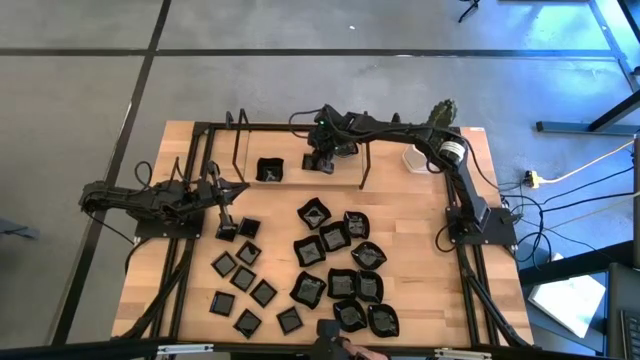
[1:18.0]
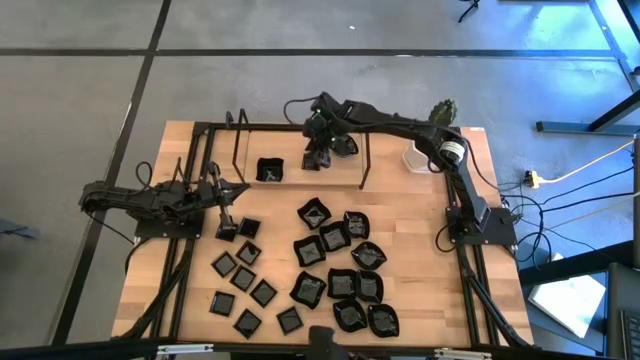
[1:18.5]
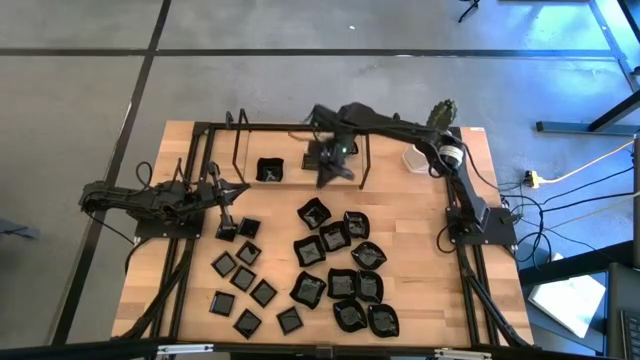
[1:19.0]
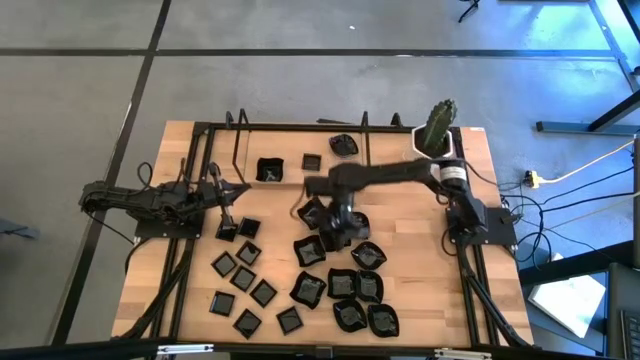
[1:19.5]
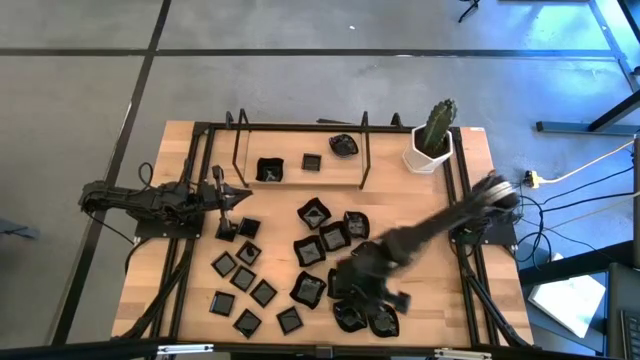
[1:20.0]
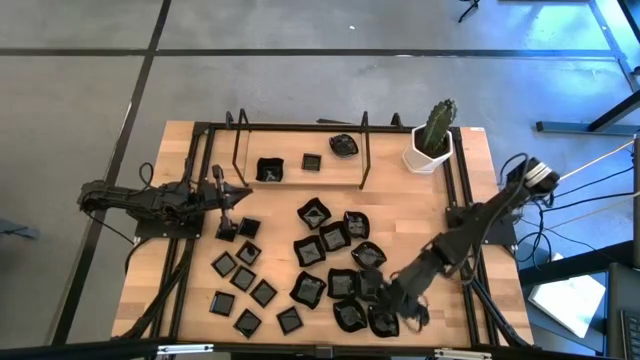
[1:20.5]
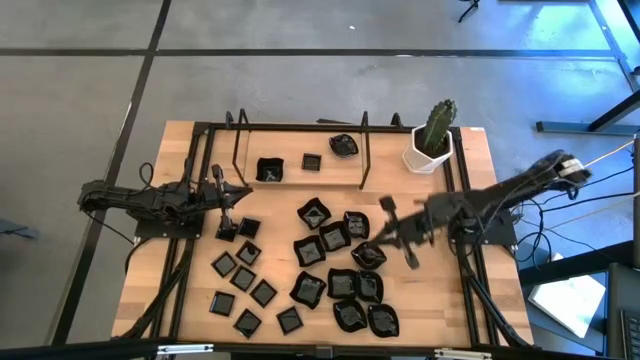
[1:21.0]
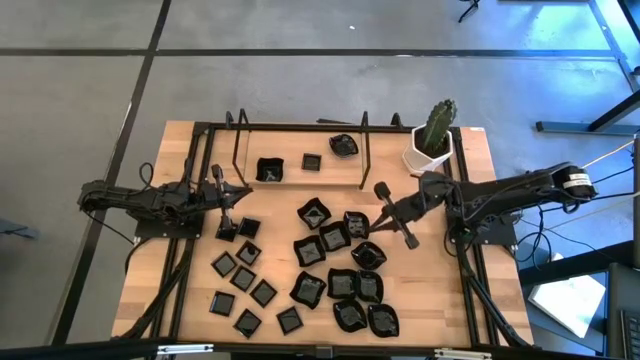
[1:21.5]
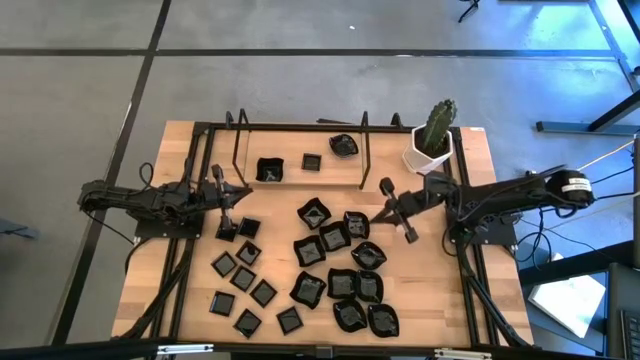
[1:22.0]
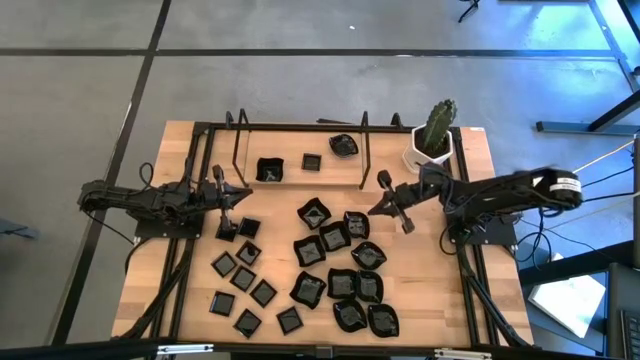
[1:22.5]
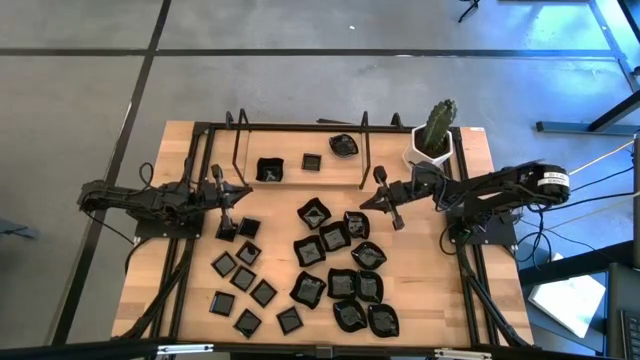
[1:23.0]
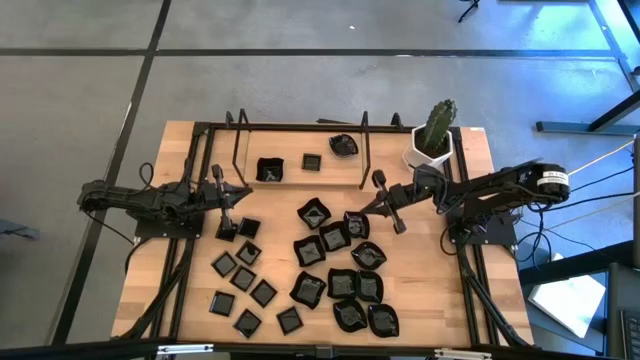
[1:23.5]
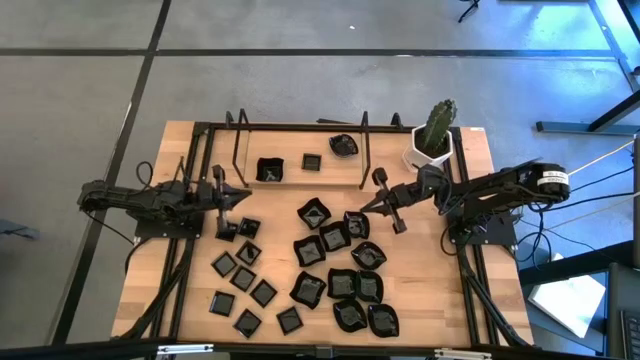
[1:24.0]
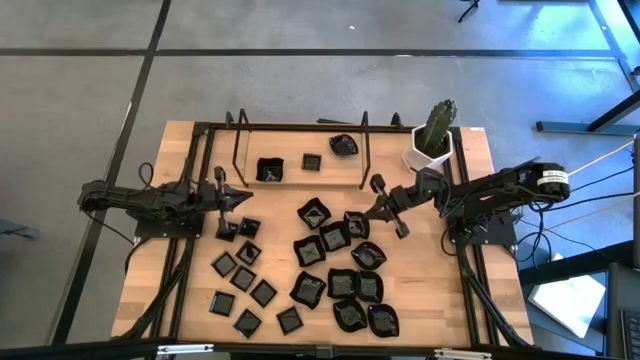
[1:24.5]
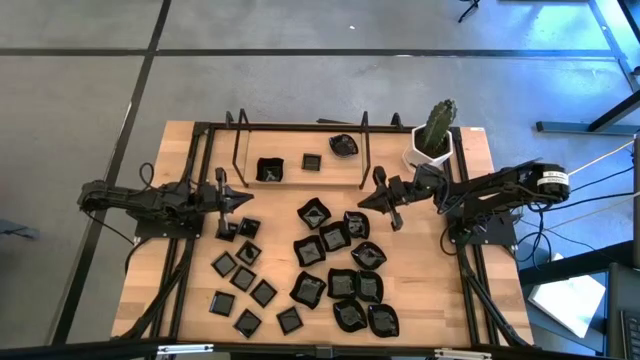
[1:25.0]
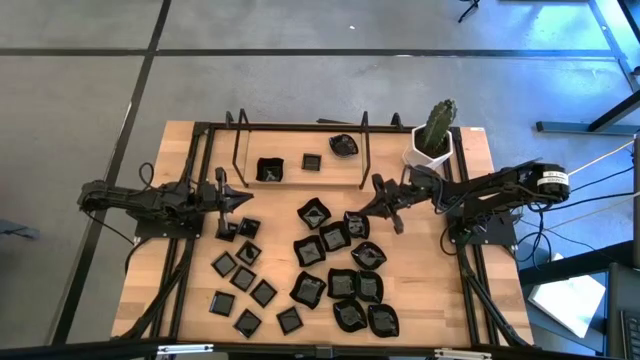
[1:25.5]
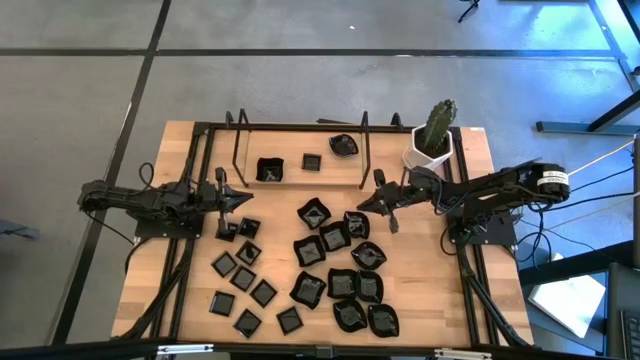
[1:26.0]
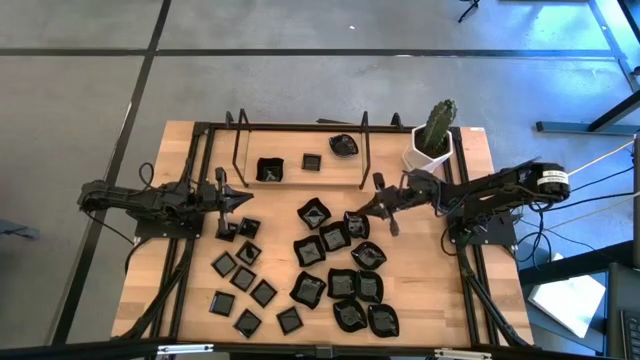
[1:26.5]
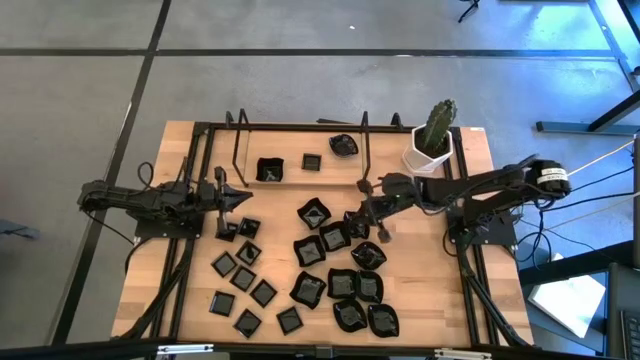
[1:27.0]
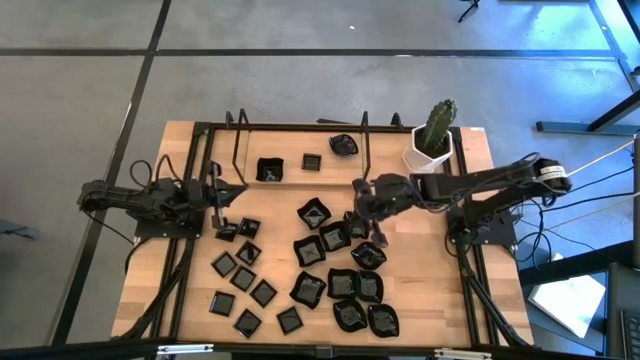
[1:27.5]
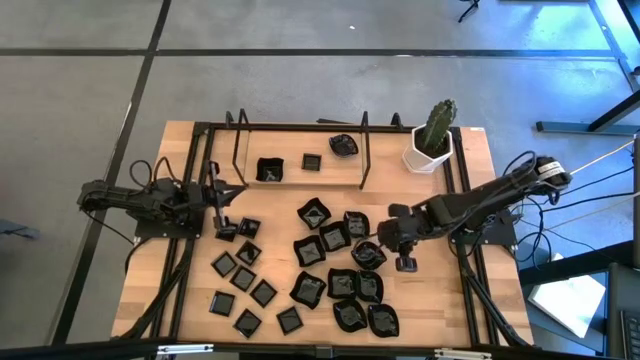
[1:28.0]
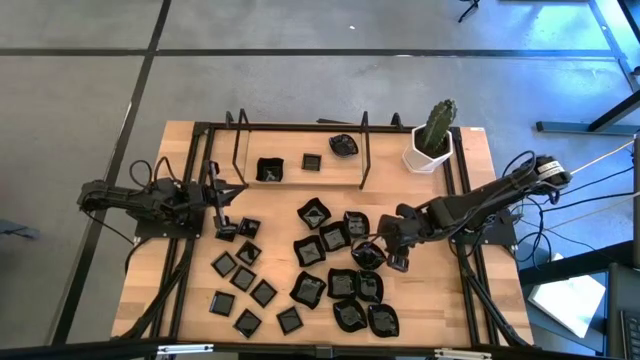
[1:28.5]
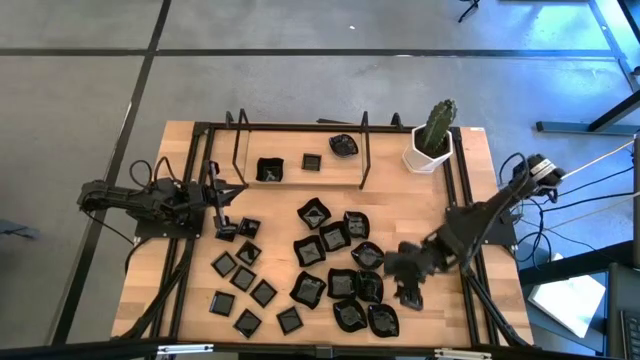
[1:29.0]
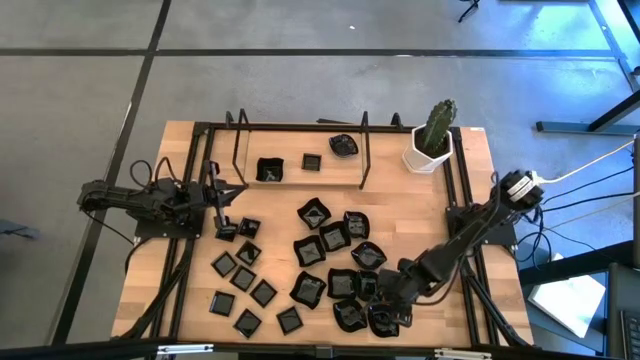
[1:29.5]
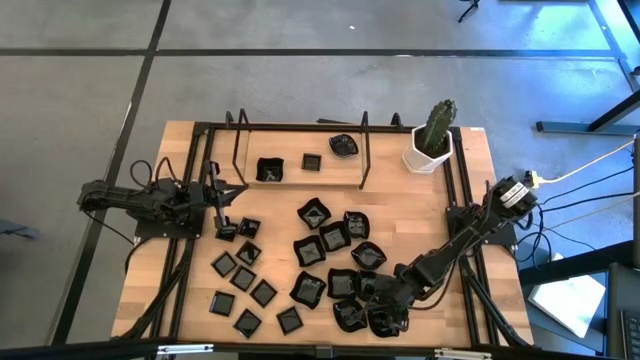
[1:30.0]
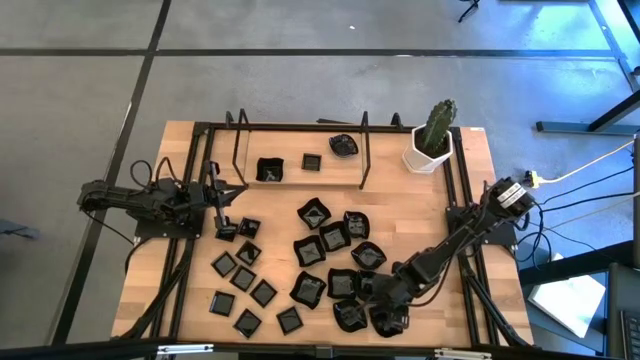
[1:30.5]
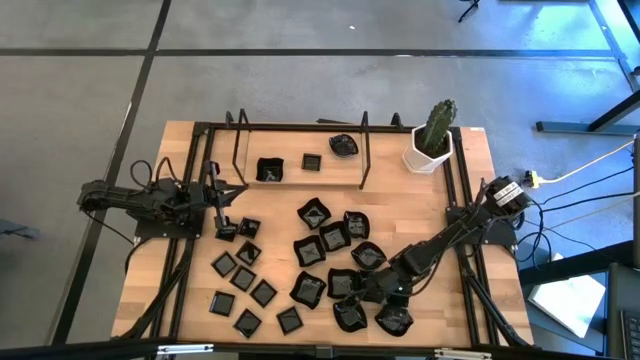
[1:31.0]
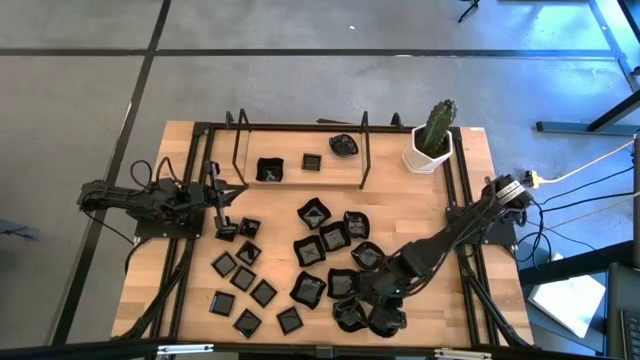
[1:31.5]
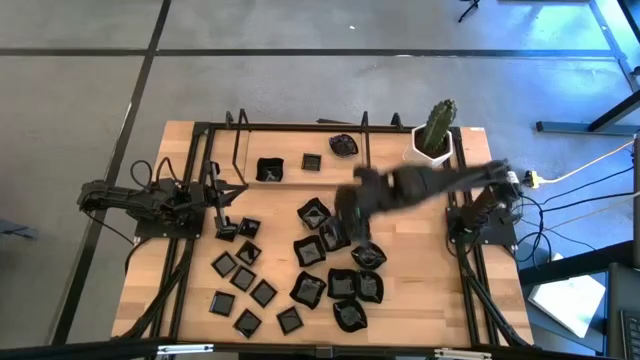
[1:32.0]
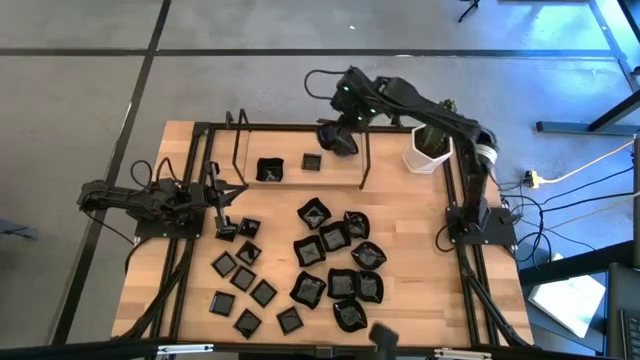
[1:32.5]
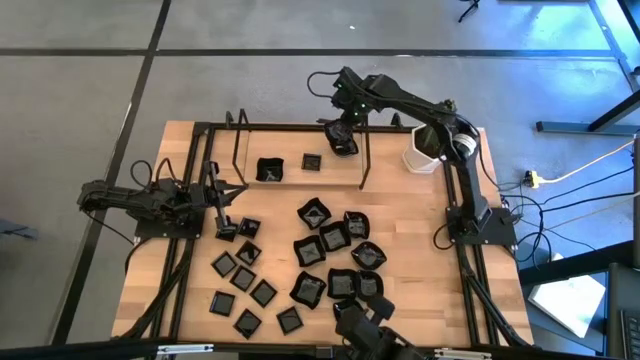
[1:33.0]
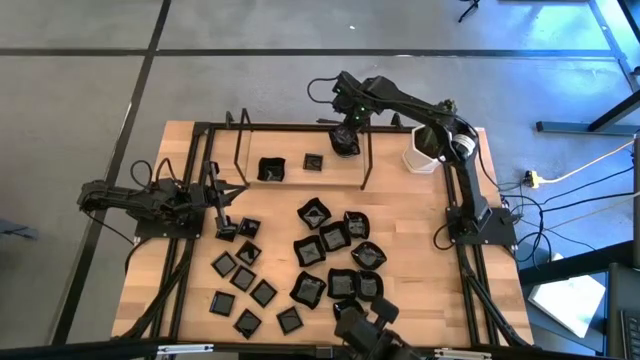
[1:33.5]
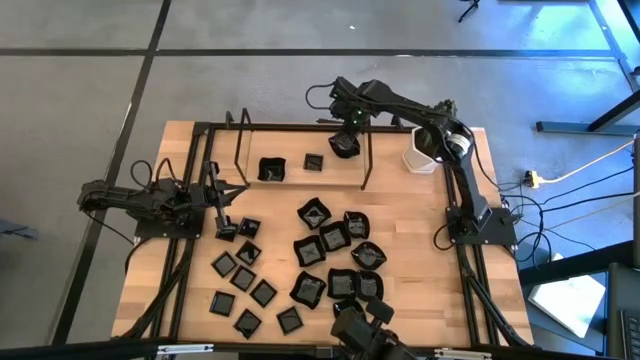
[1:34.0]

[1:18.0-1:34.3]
Task: Pick & Place Mini shaped plates
Stack the leaf-shaped plate on top of the leaf-shaped plate on the shelf

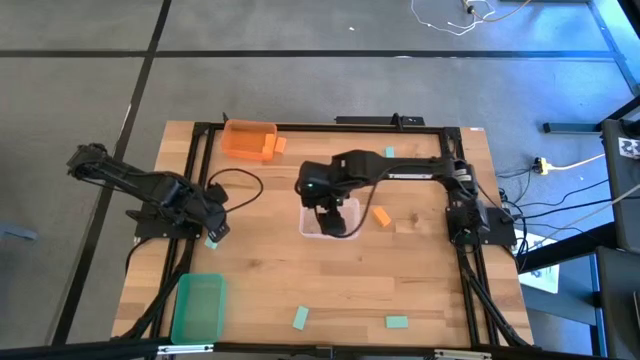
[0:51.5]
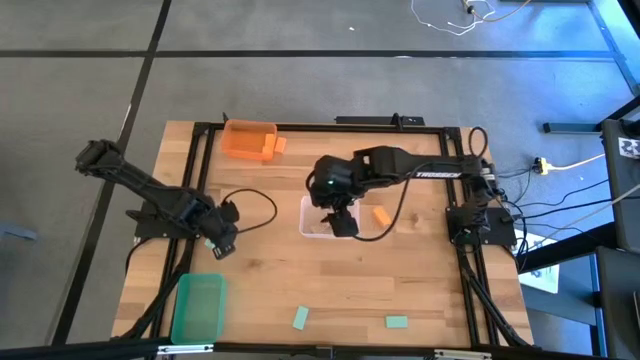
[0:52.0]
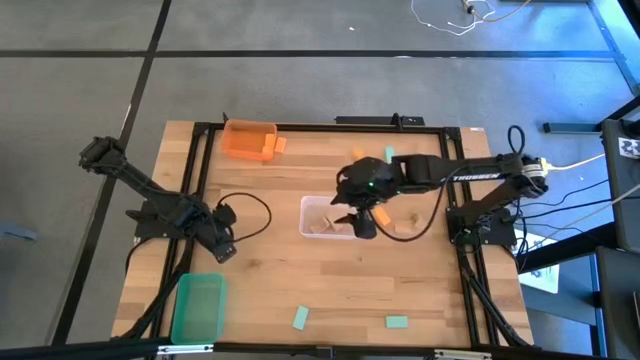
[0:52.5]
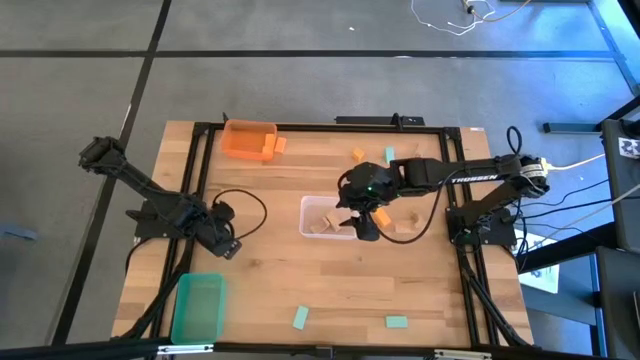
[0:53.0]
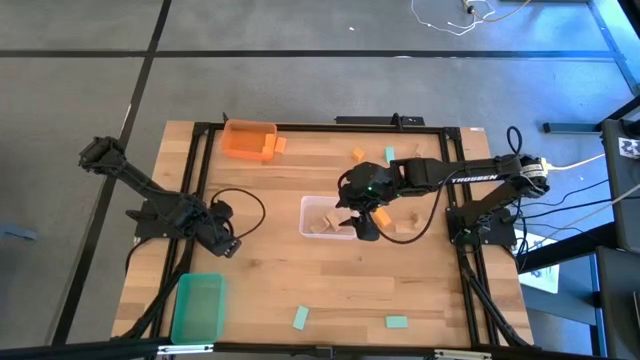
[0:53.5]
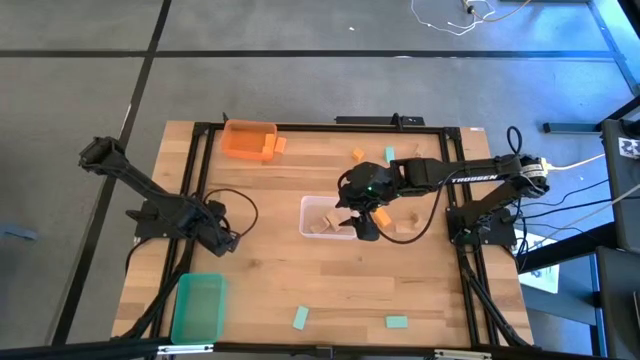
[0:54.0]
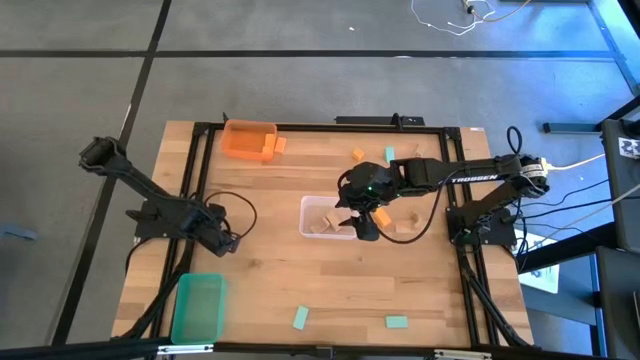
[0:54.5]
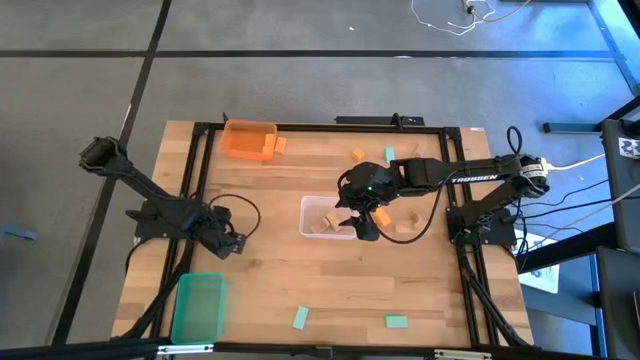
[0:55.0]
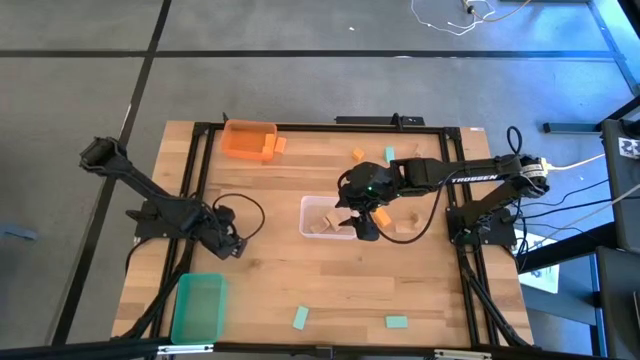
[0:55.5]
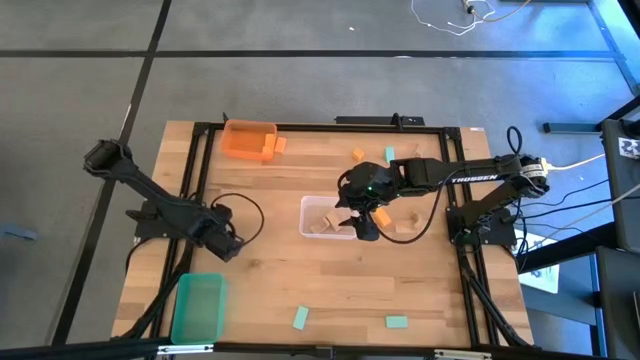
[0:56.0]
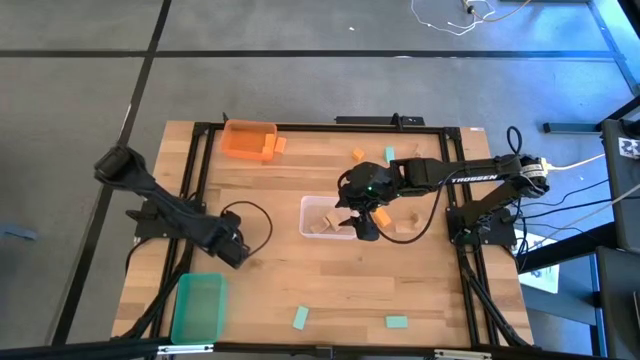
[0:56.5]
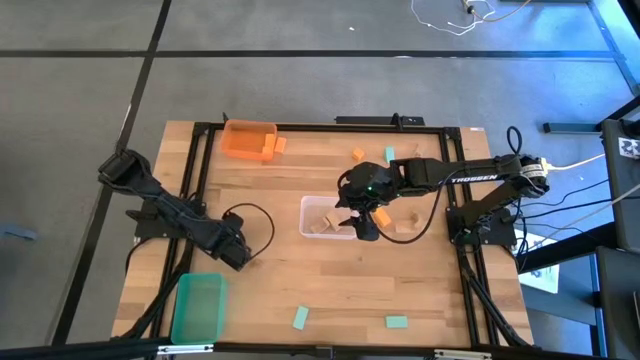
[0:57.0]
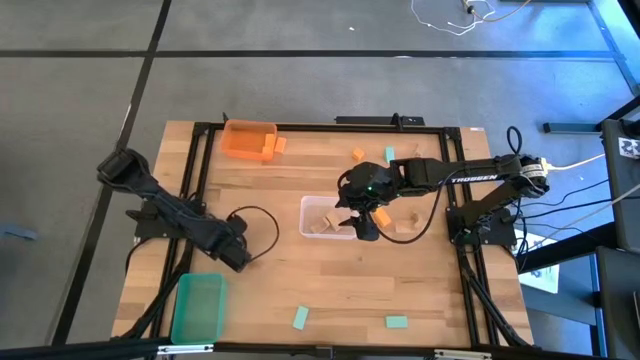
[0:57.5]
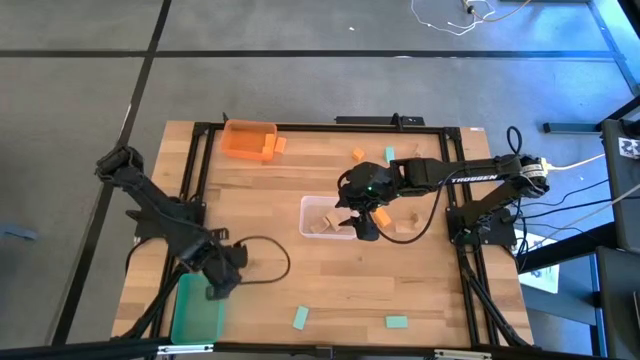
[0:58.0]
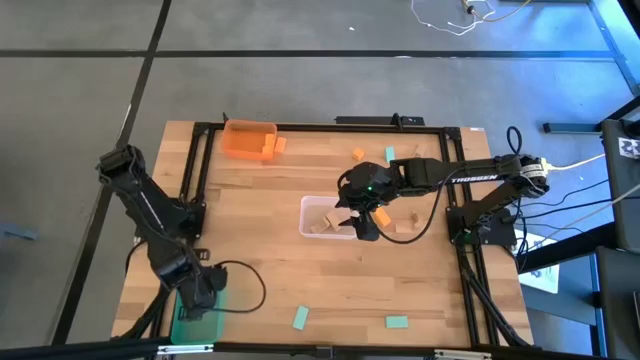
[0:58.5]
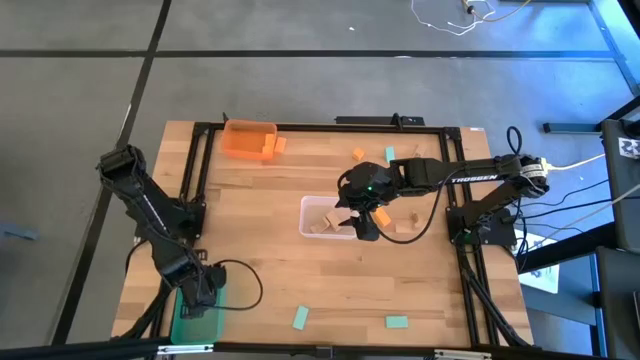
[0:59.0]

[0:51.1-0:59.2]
Task: Sort & place blocks by color
Put the blue lock into the green bin
